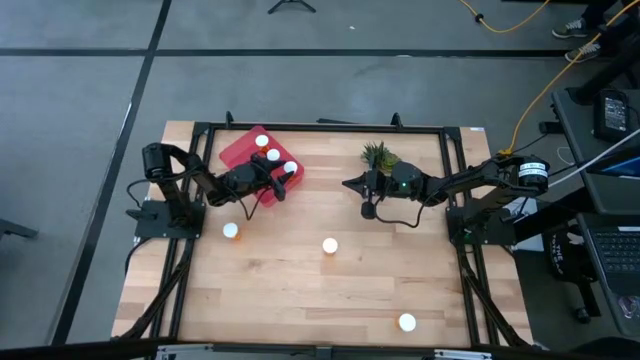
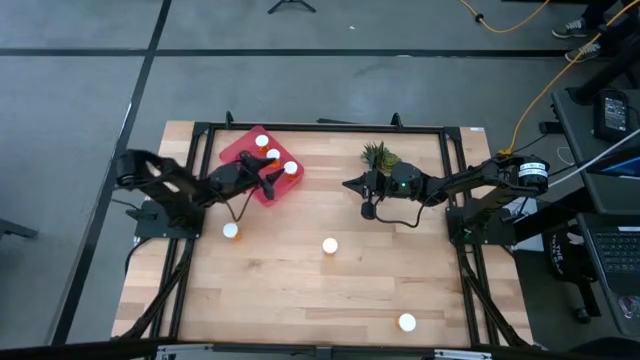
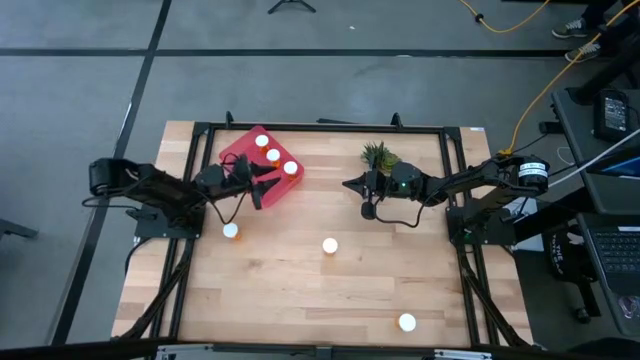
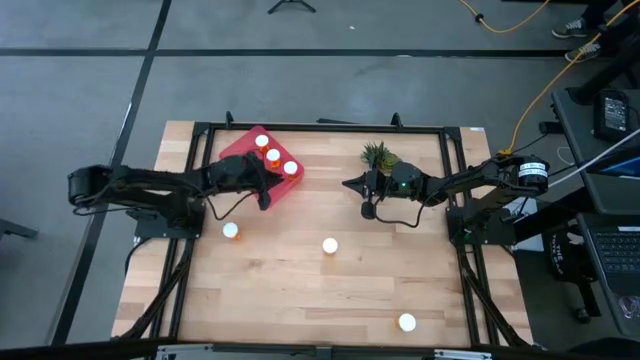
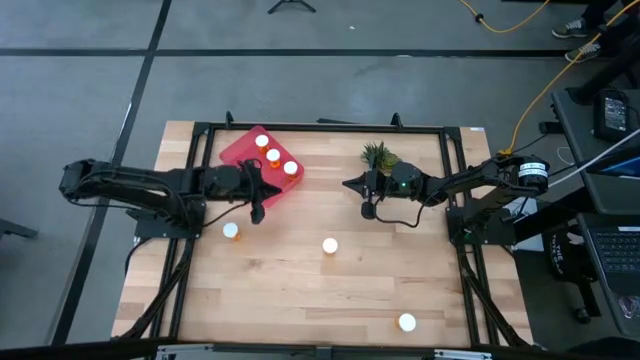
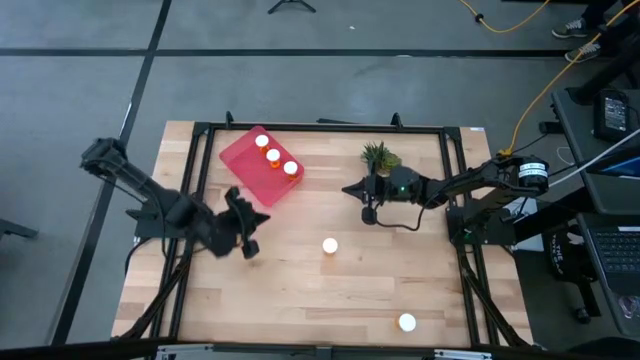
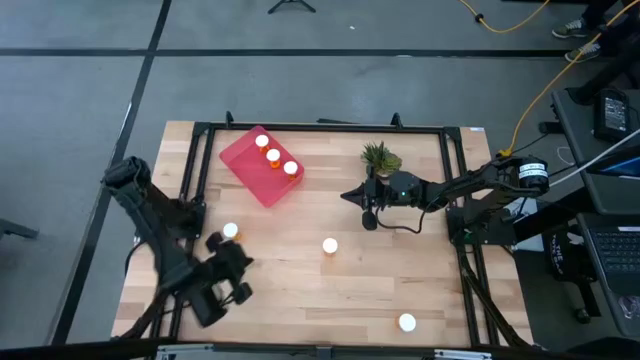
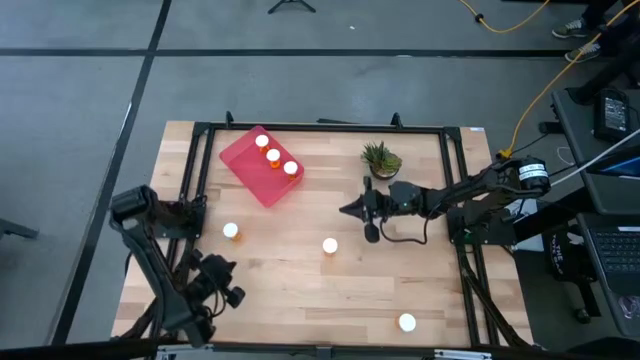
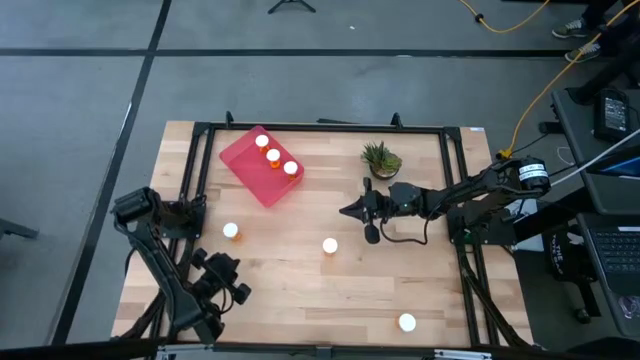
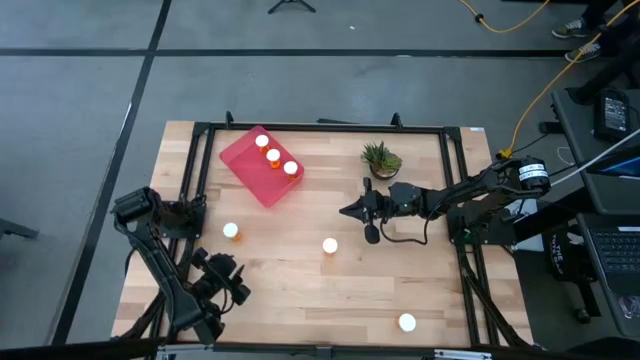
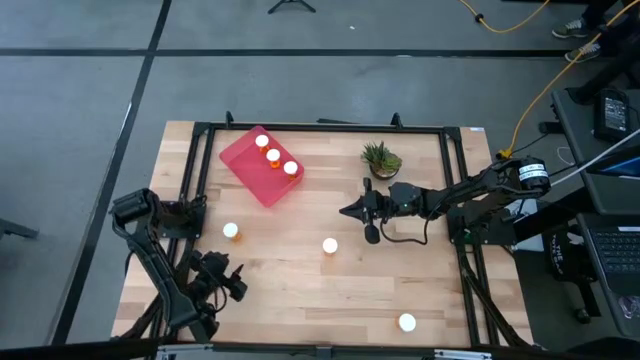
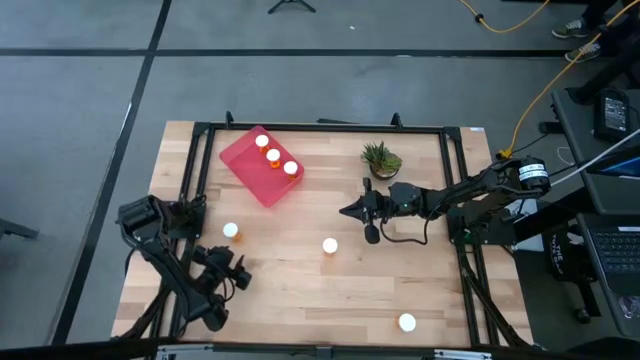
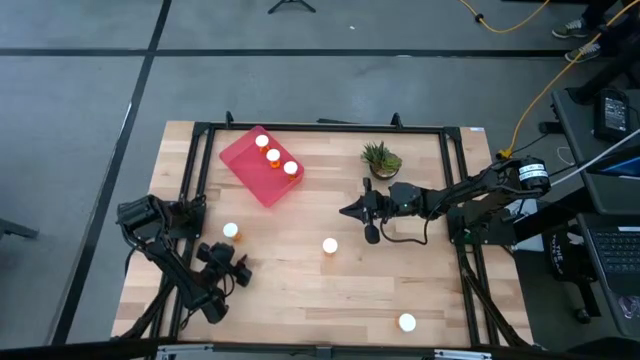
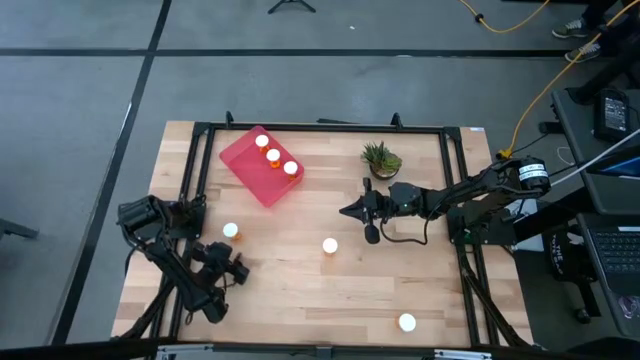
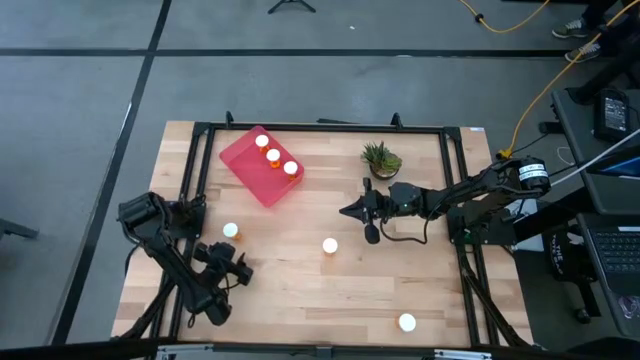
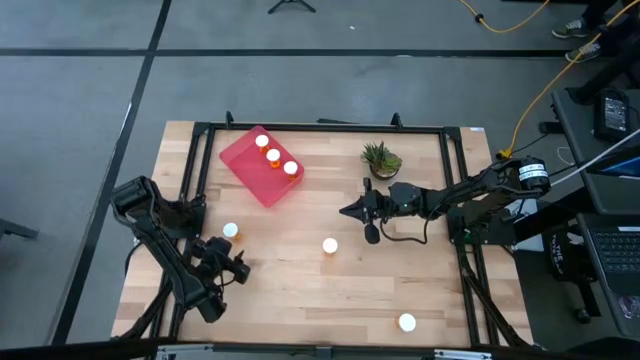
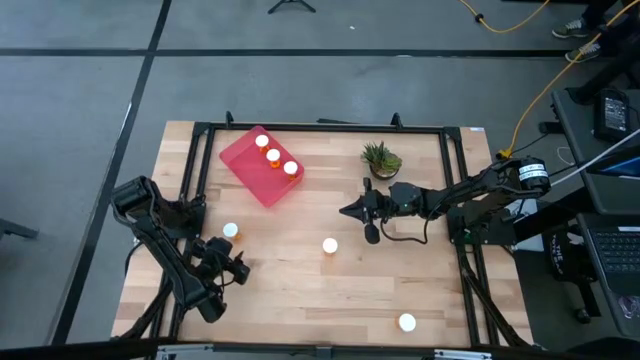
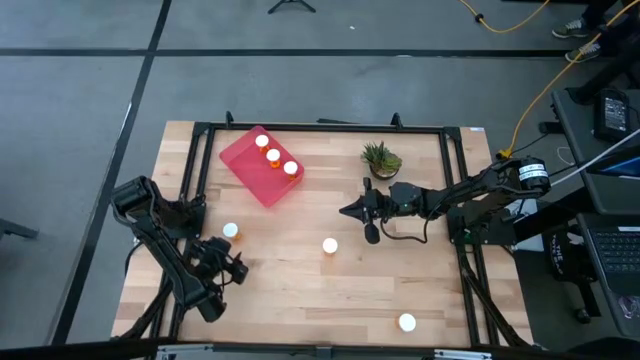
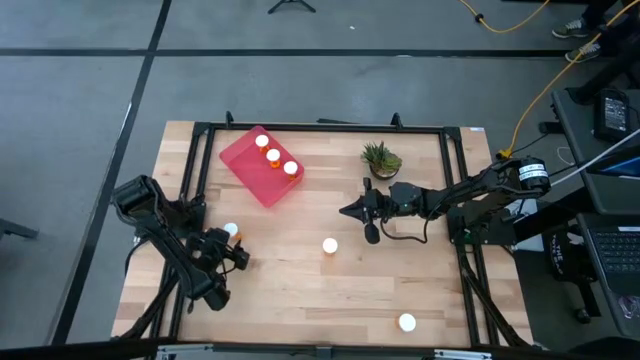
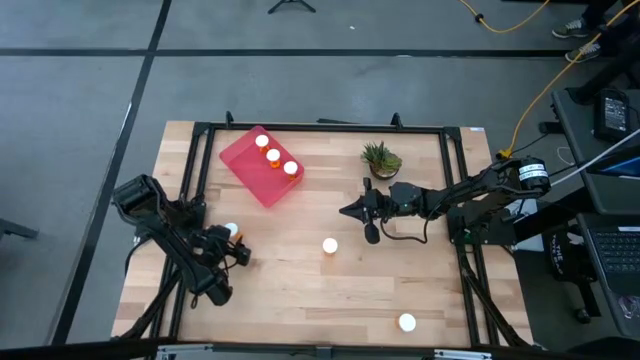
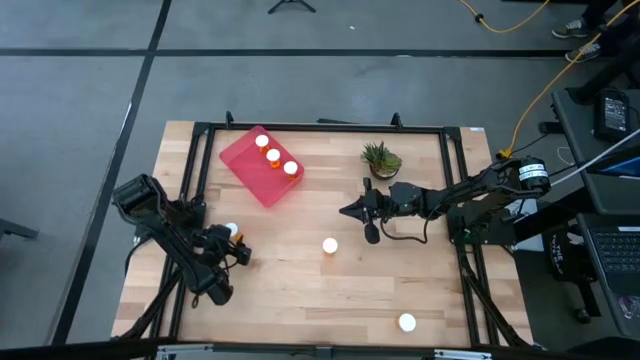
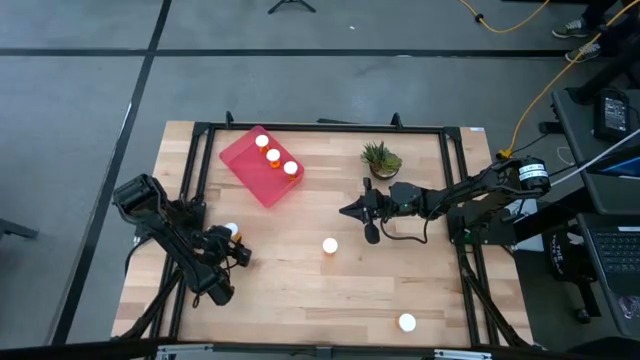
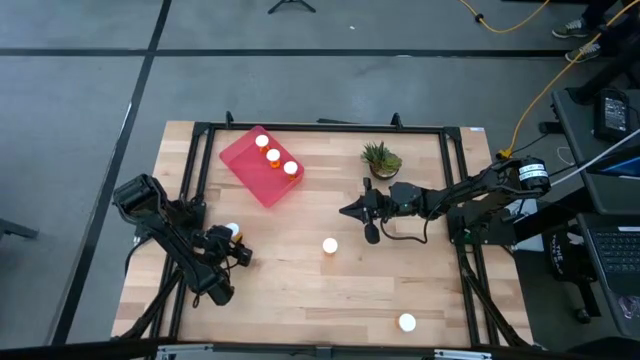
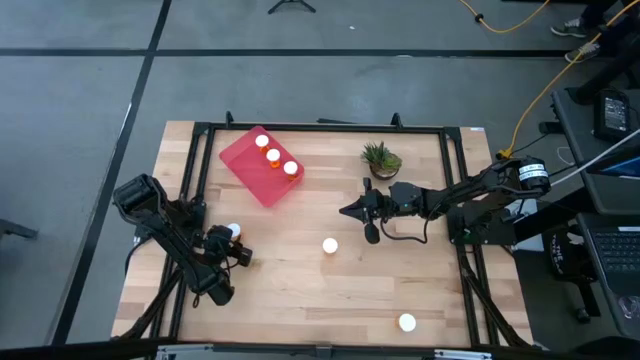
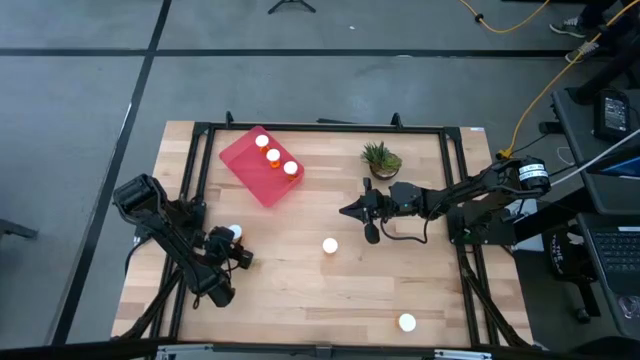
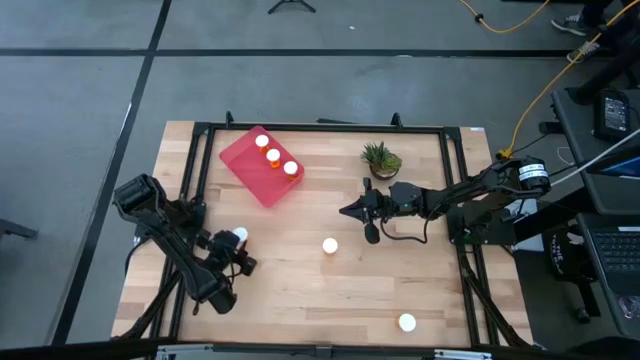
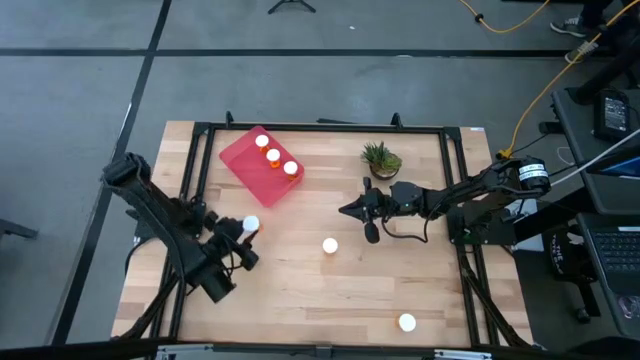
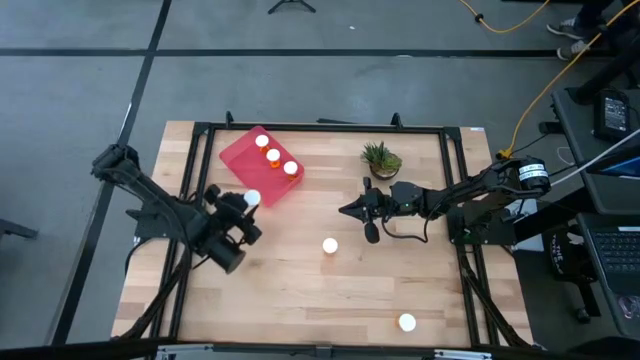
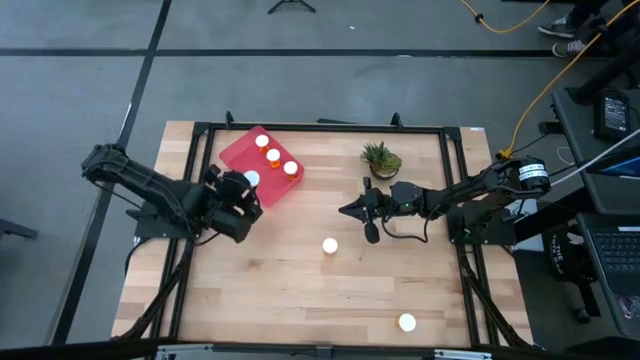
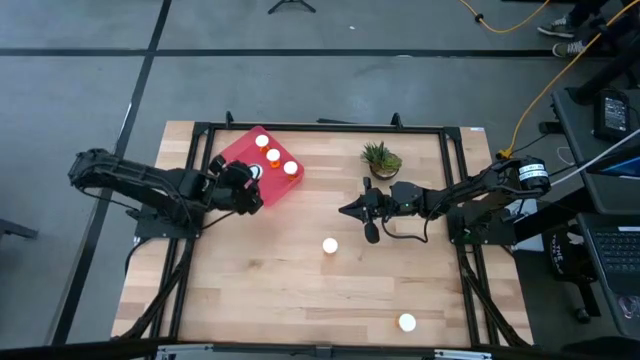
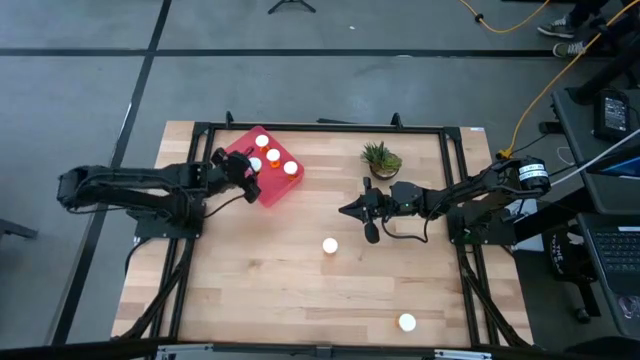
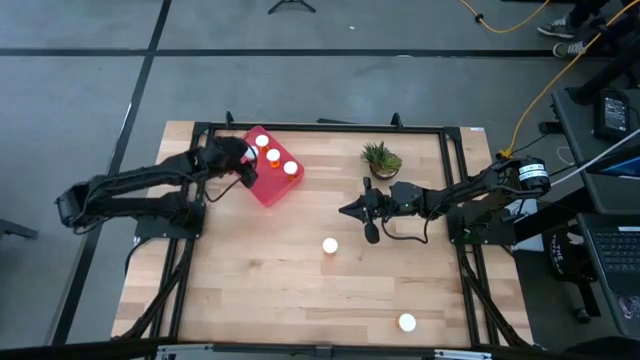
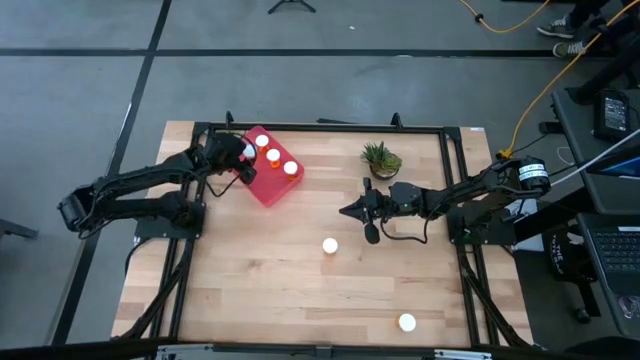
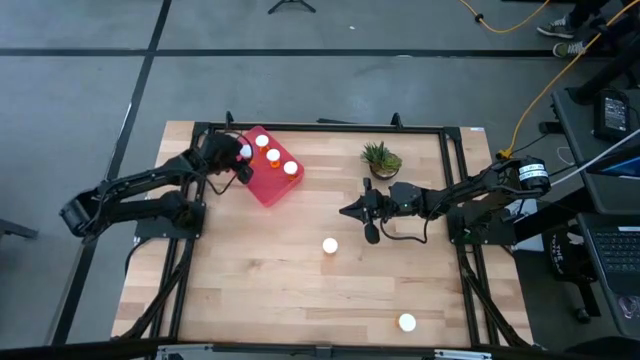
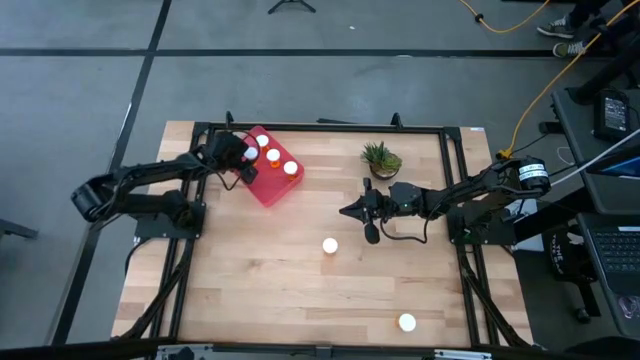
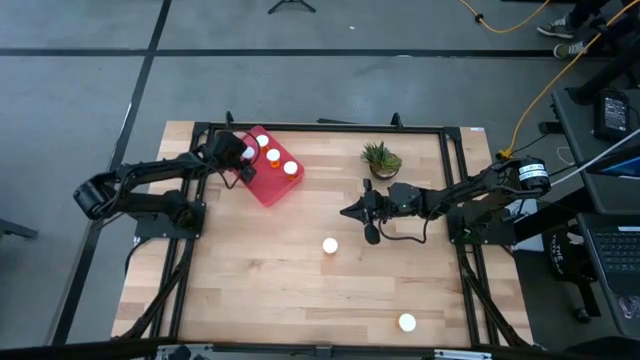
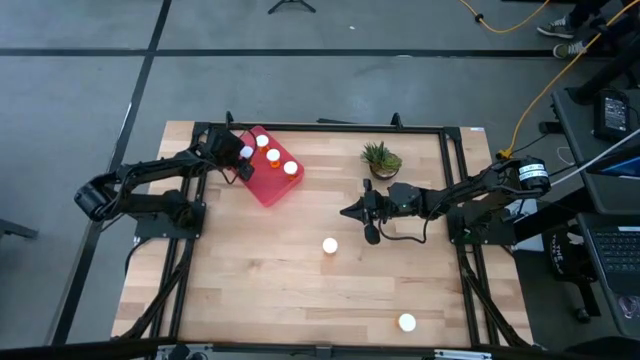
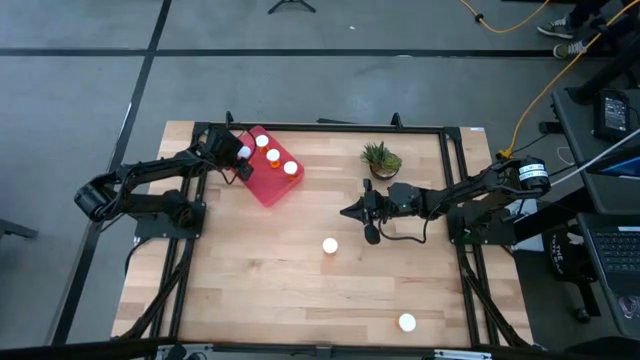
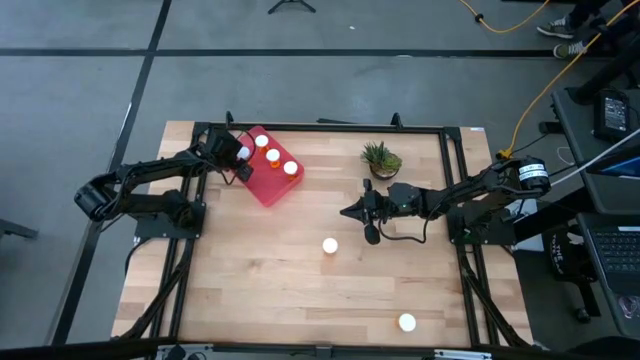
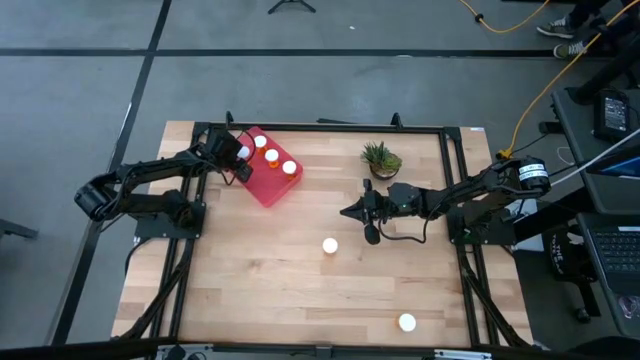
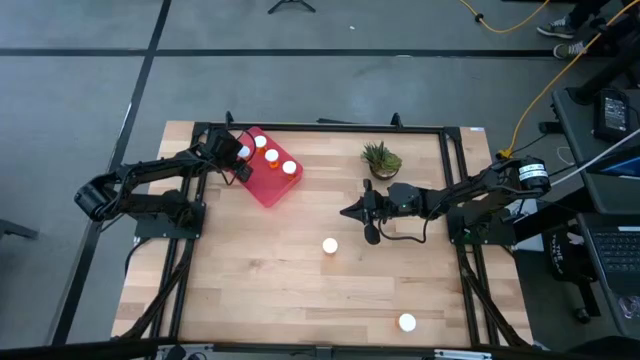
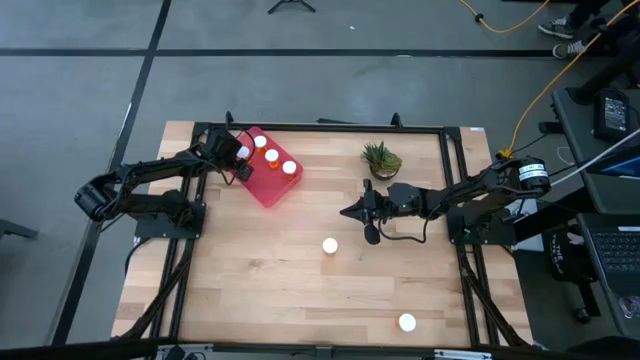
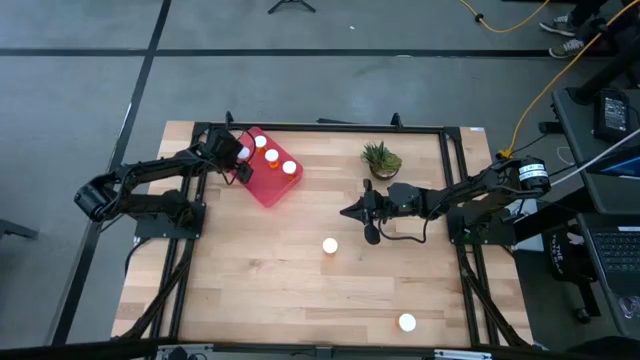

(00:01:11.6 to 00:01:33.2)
Task: Pick and place pill bottles into a basket
Put the top orange pill bottle into the red container
